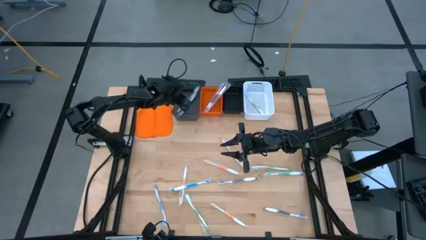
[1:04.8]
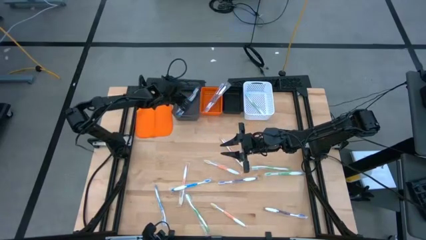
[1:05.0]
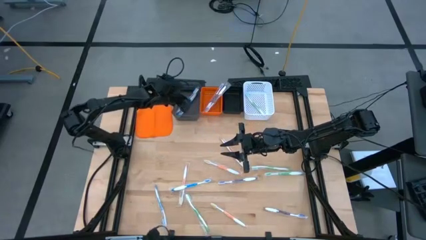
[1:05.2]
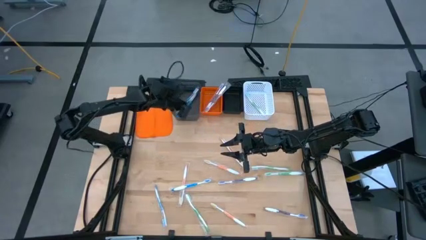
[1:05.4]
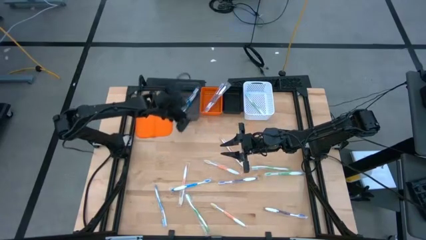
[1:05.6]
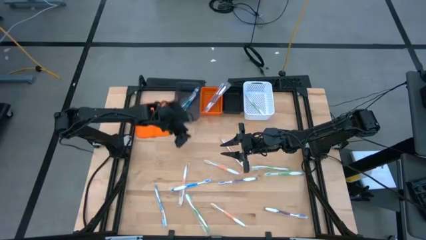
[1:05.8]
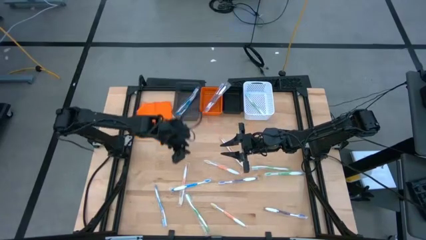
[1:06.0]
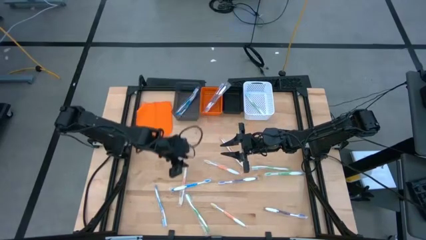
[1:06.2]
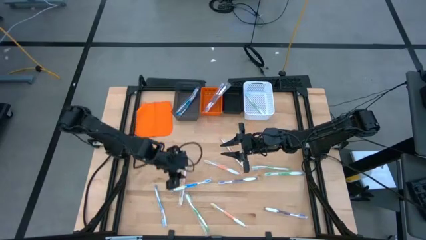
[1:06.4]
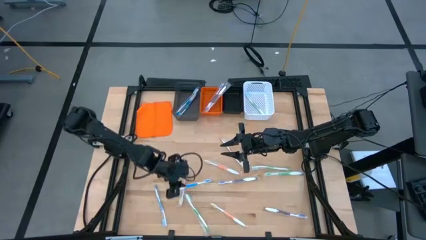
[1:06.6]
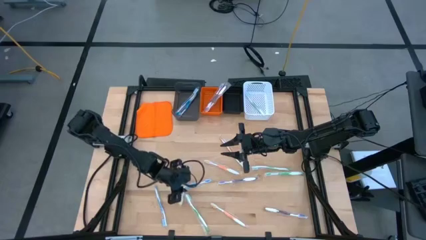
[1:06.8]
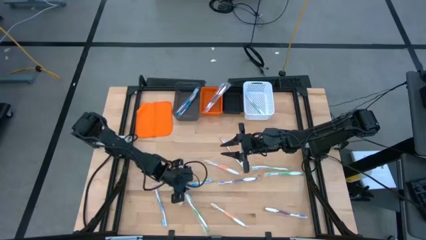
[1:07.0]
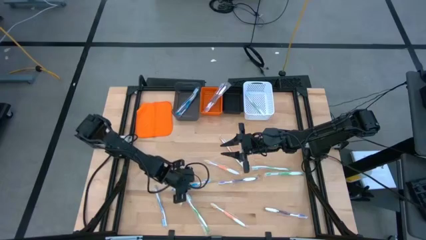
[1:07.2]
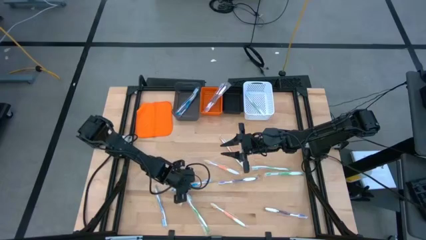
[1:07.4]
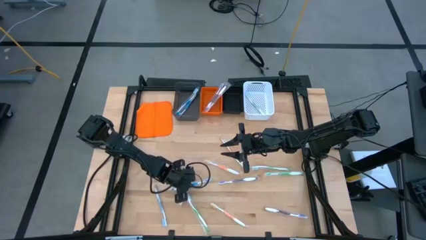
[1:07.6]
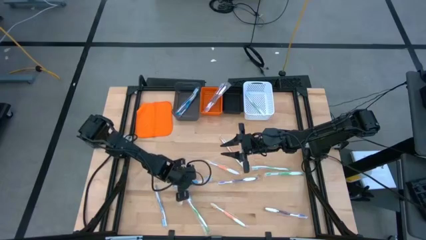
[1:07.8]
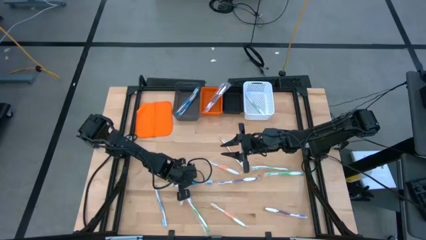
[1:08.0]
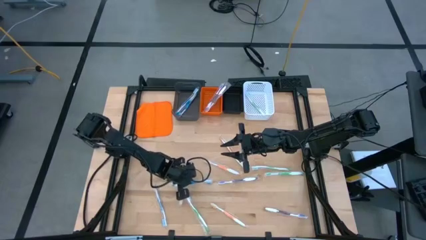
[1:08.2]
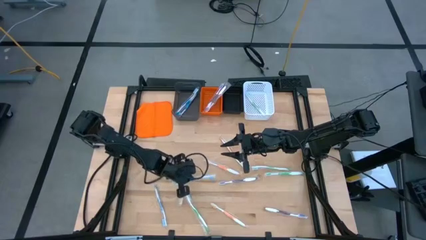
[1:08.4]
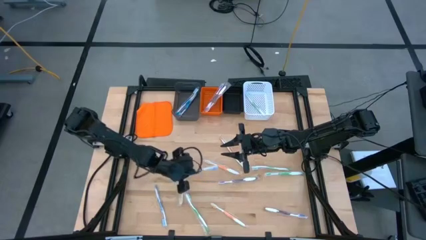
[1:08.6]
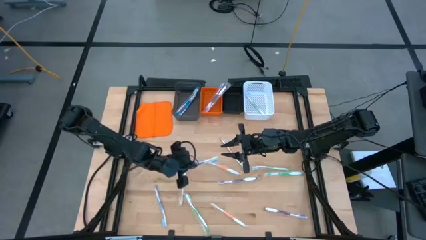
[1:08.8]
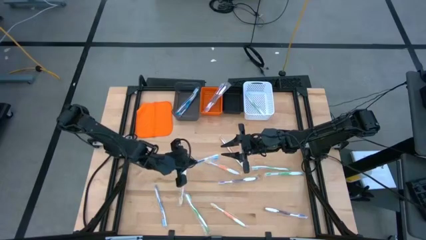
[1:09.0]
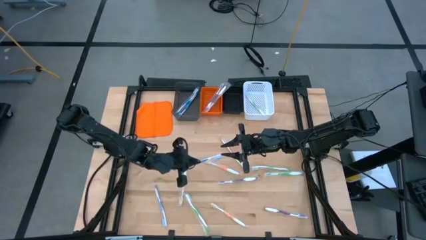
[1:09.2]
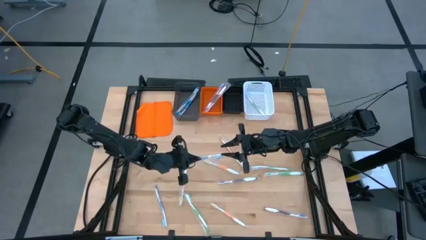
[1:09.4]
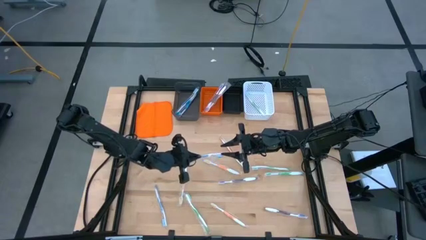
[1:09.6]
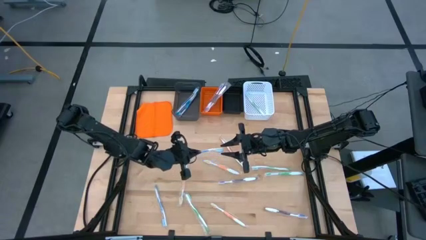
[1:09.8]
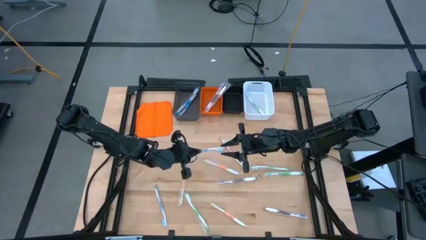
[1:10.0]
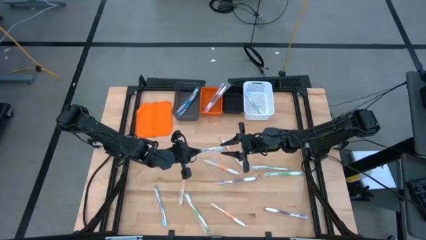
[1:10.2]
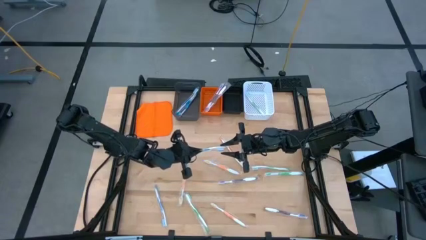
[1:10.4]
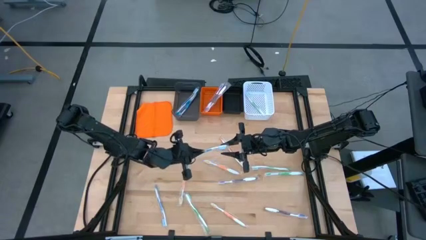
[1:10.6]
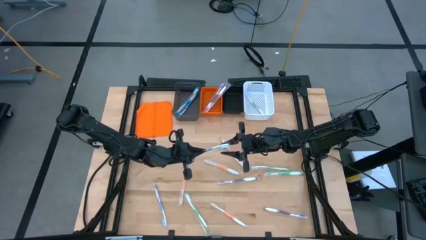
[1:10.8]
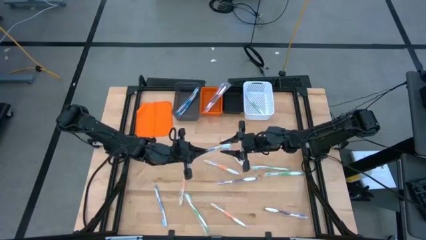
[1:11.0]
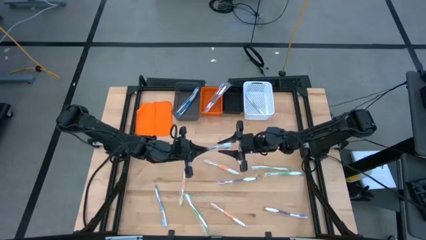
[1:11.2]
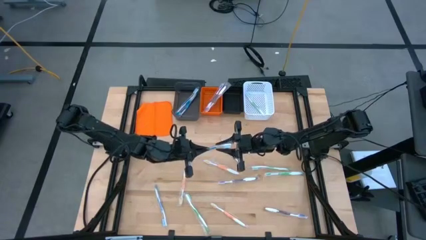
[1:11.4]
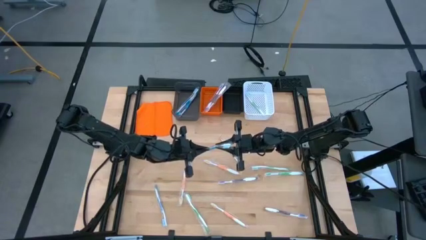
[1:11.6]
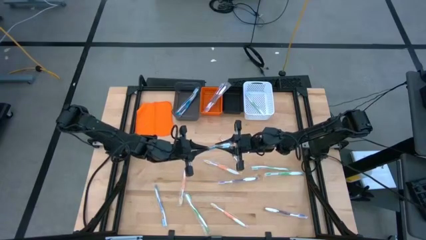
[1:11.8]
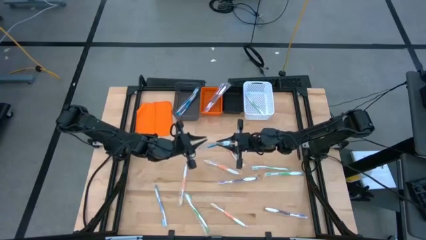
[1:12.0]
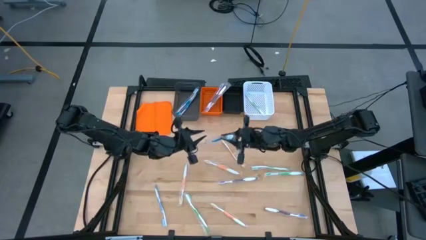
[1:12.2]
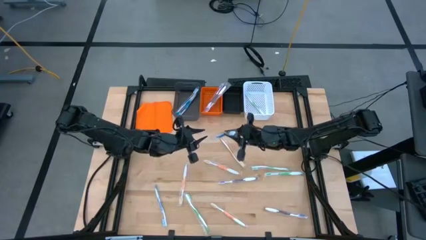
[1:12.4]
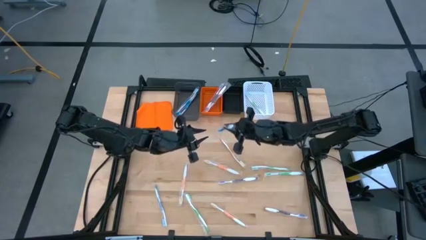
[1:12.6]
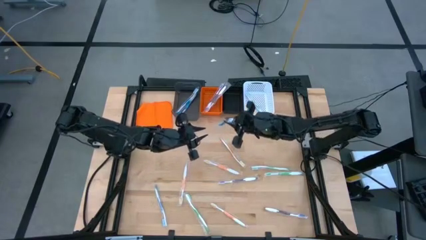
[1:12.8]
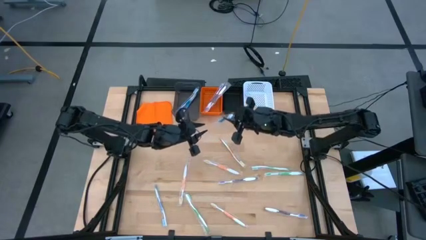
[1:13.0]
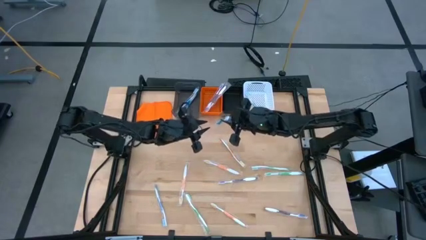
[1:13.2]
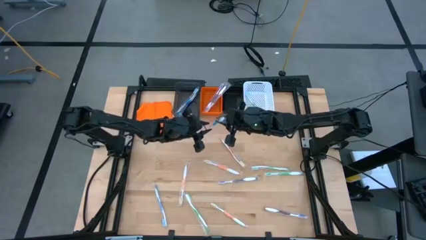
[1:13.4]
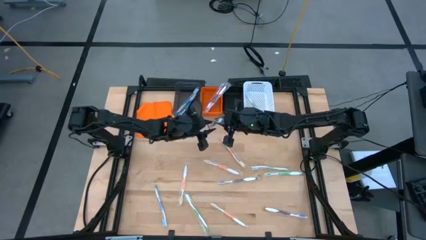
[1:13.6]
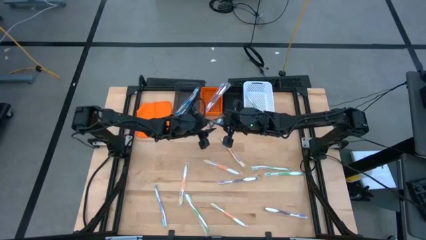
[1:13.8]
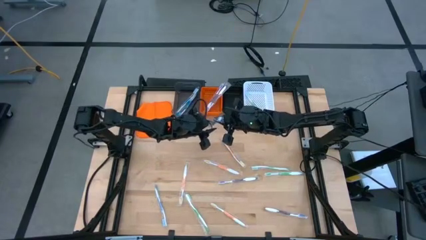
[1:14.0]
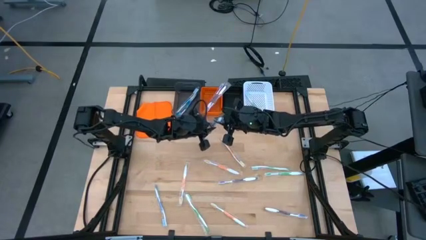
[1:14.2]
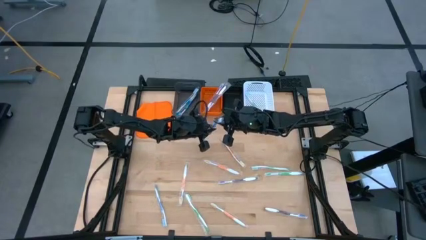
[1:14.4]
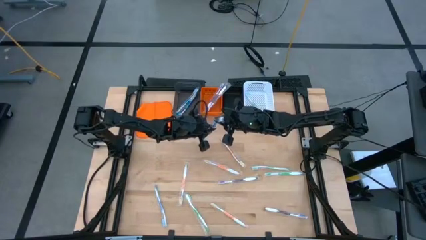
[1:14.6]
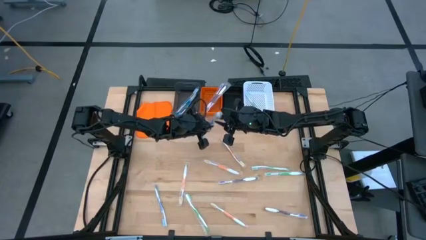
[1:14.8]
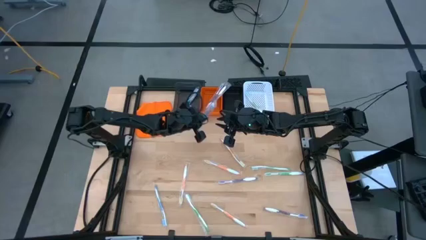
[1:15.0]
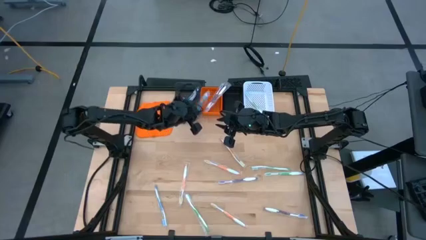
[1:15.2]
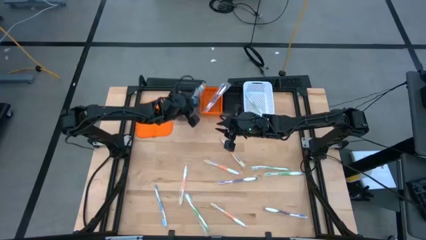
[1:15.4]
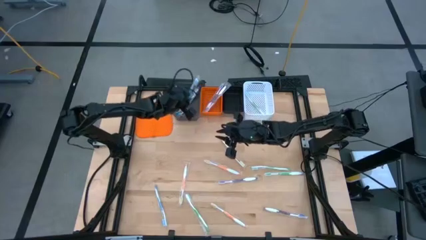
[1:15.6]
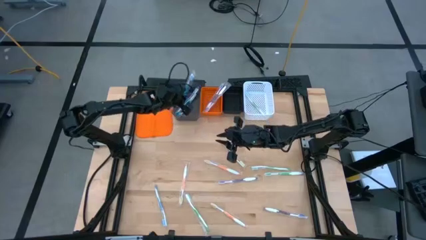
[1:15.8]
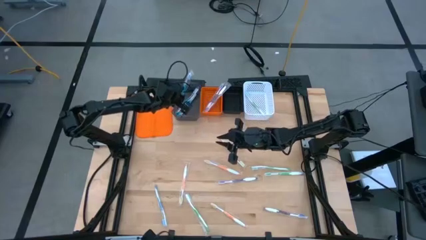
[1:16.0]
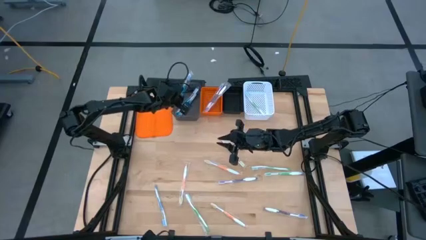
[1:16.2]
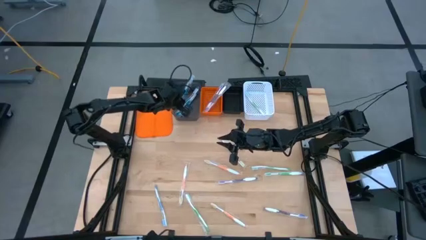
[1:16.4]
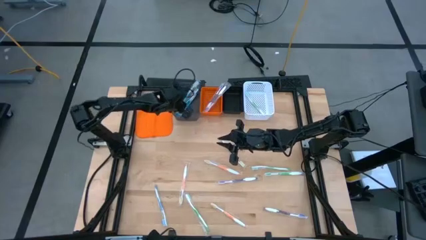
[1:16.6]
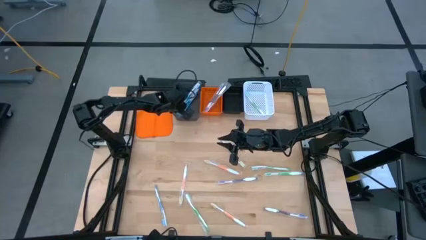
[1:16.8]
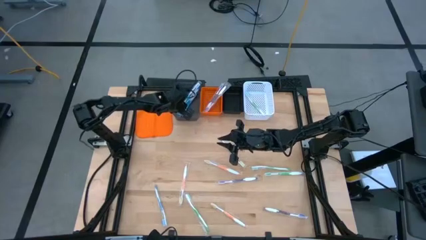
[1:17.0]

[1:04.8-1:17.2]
Task: Pick & Place Toothbrushes
Put the blue toothbrush into the gray bin

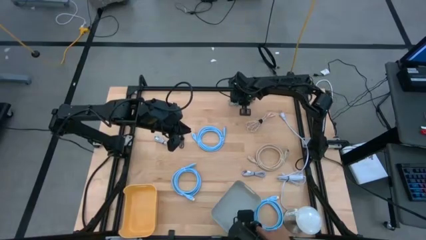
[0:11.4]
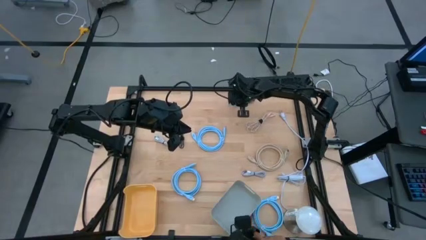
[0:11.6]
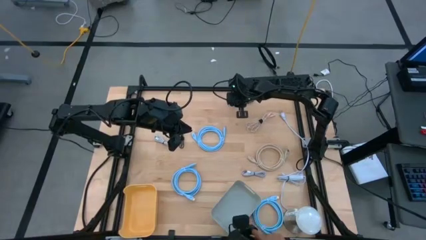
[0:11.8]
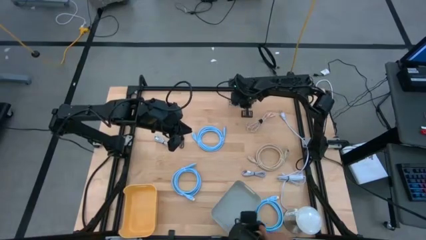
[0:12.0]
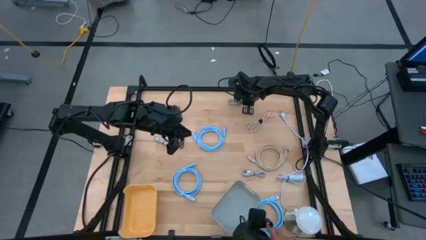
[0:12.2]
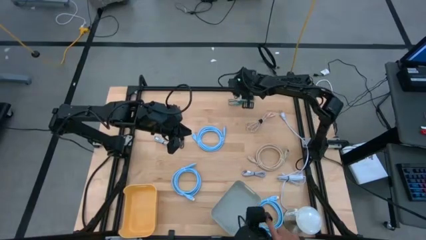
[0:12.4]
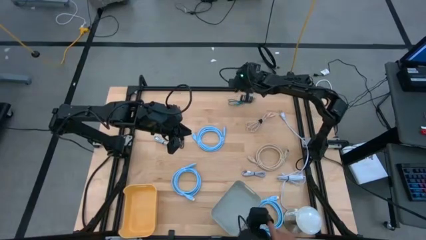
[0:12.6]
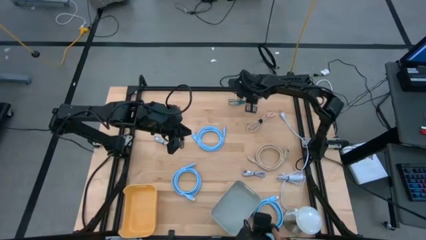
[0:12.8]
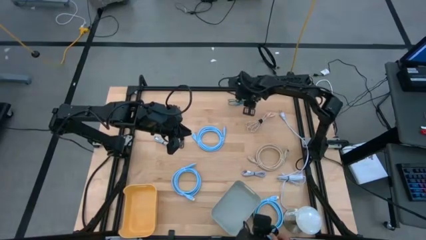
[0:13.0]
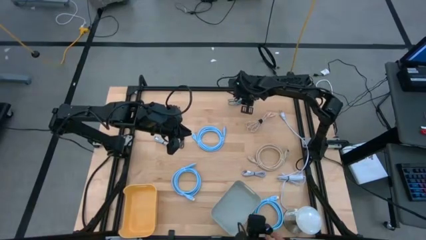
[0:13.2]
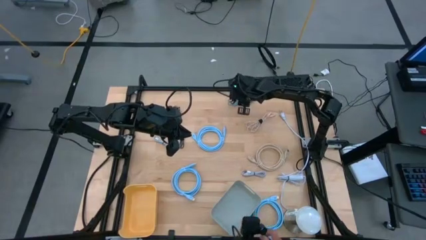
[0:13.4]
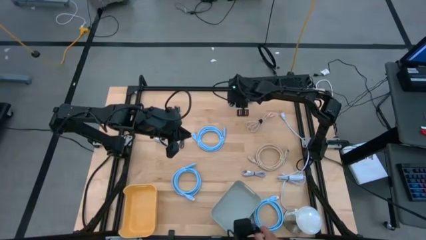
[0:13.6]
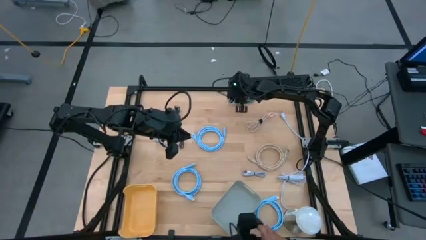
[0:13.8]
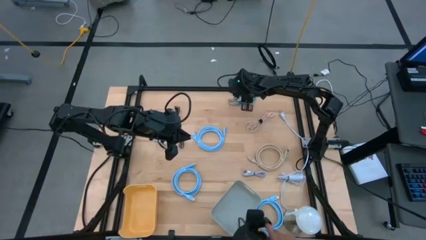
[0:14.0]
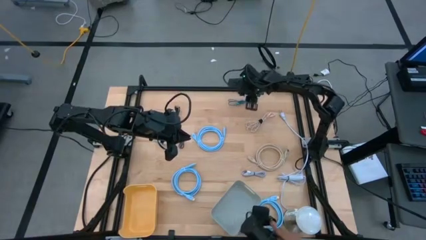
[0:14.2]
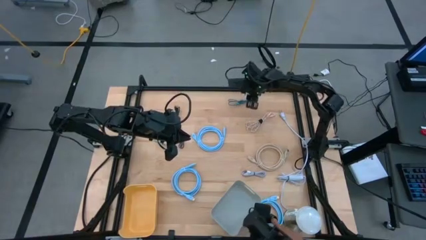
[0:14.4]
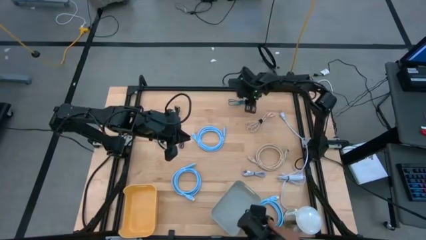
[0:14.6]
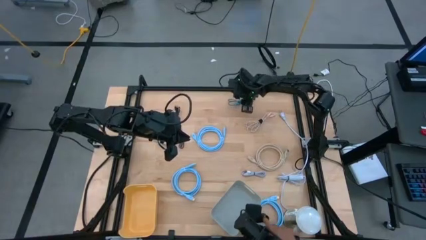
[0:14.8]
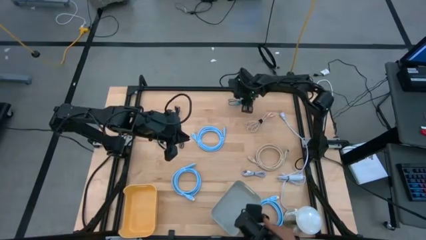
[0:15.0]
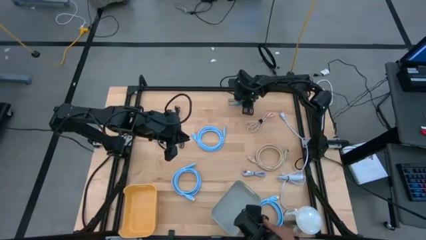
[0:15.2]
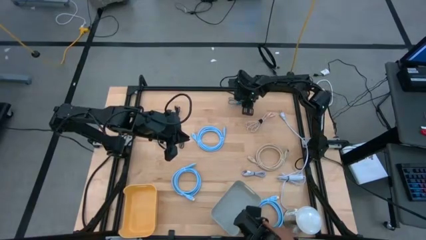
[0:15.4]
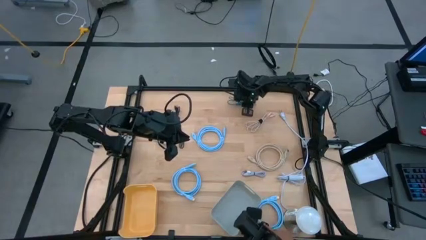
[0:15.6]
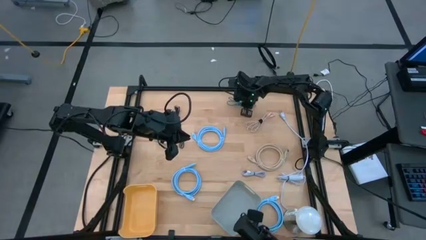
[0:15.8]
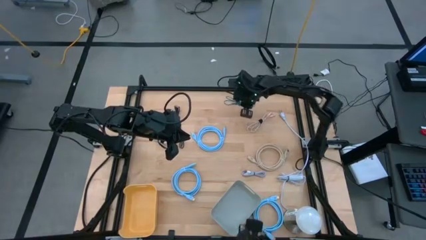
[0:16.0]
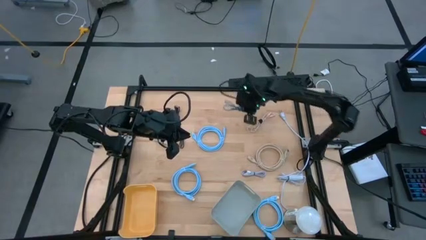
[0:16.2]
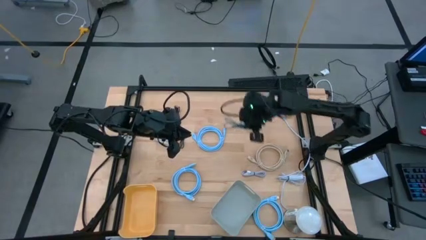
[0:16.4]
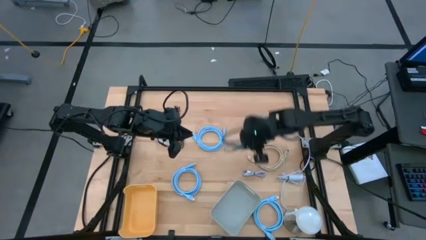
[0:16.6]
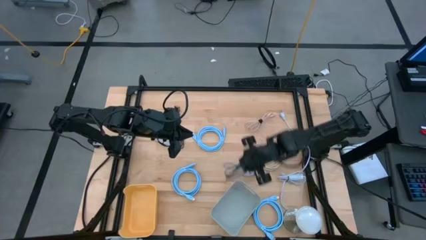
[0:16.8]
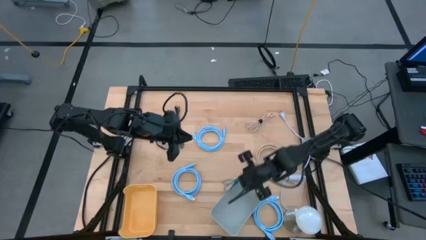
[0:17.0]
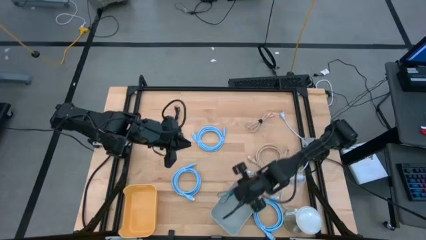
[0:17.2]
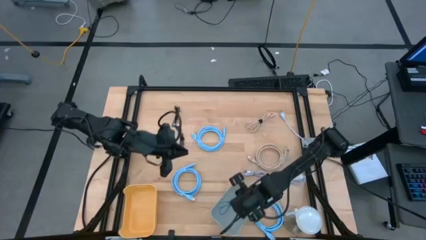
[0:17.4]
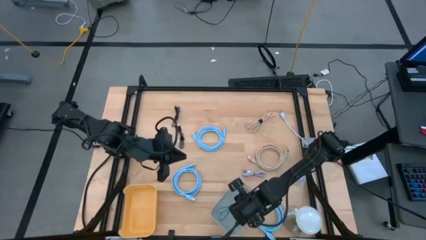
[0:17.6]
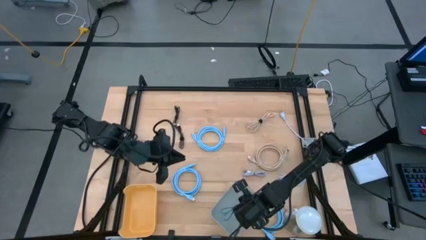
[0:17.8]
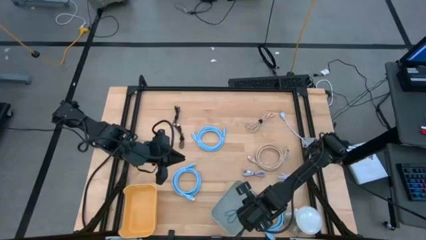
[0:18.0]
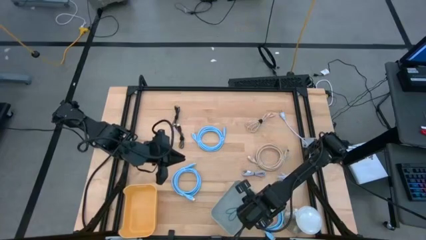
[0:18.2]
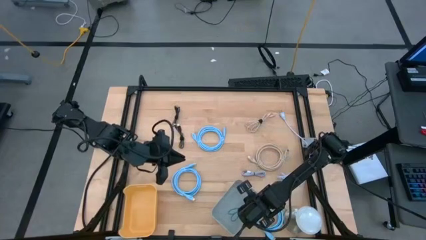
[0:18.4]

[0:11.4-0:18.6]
Task: Sort cables
Put the green charger cable into the gray bin
